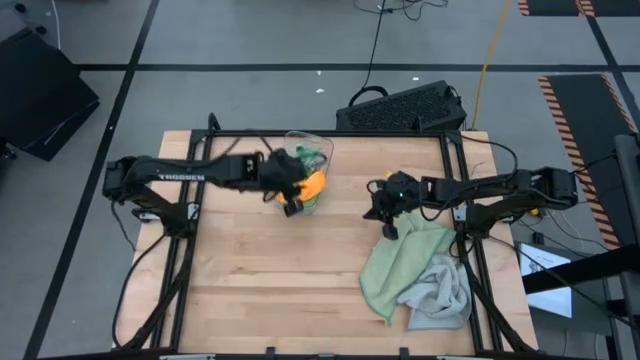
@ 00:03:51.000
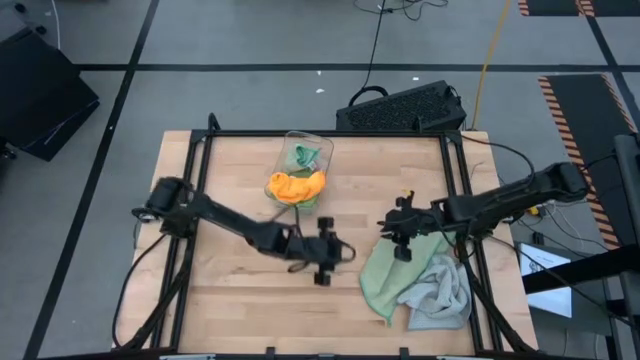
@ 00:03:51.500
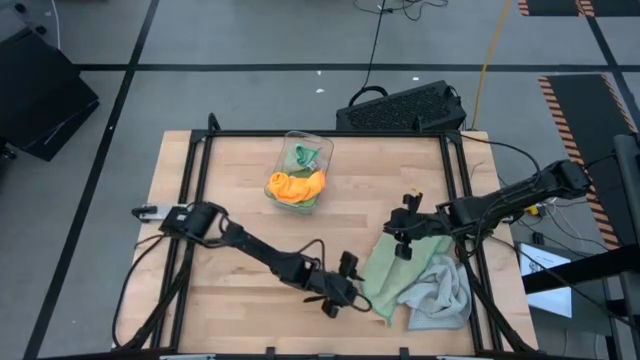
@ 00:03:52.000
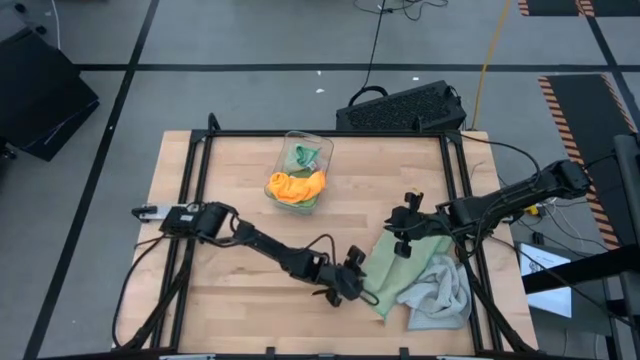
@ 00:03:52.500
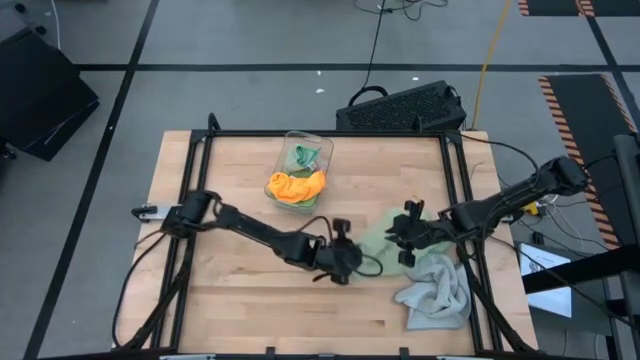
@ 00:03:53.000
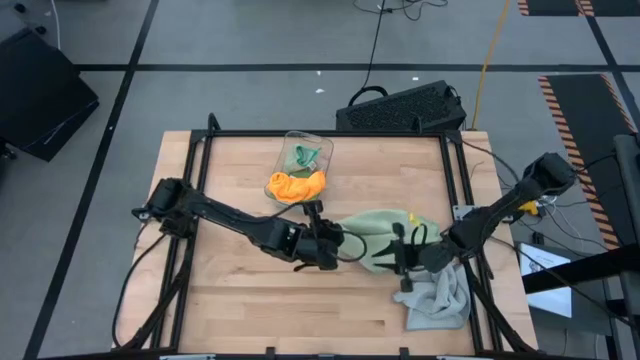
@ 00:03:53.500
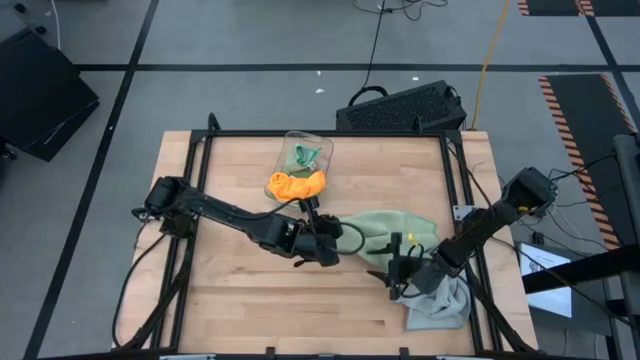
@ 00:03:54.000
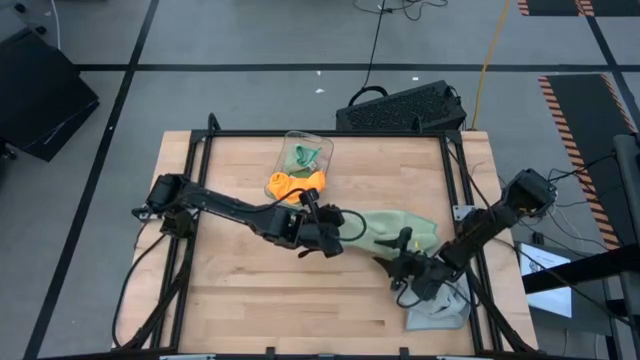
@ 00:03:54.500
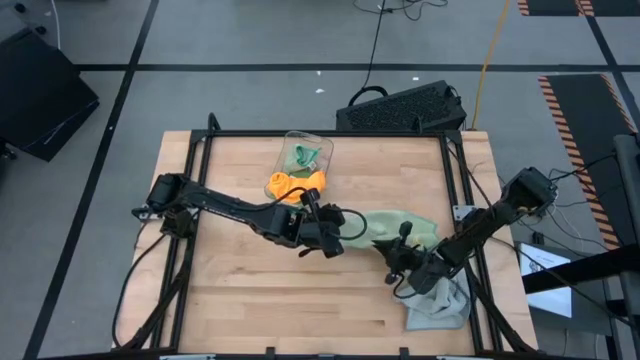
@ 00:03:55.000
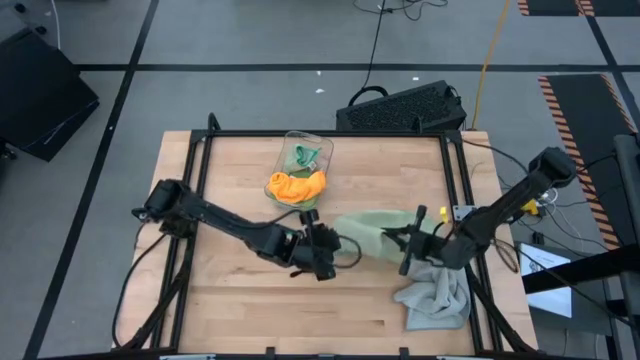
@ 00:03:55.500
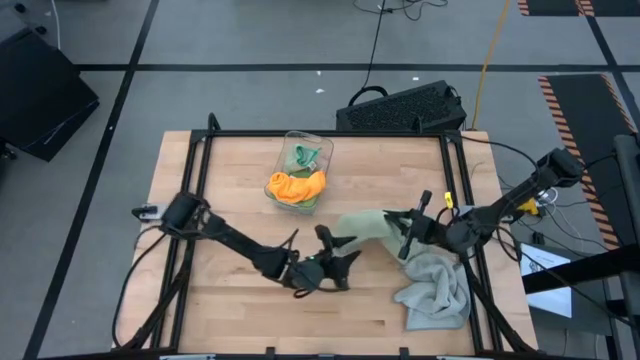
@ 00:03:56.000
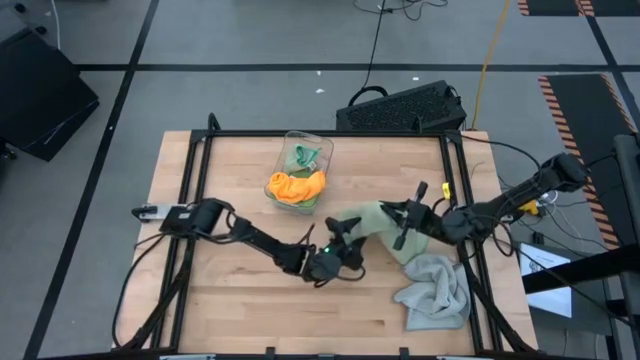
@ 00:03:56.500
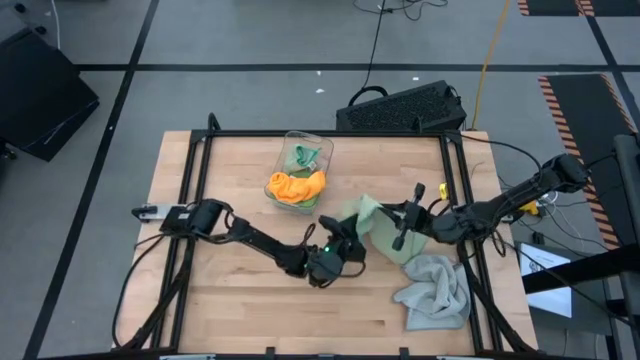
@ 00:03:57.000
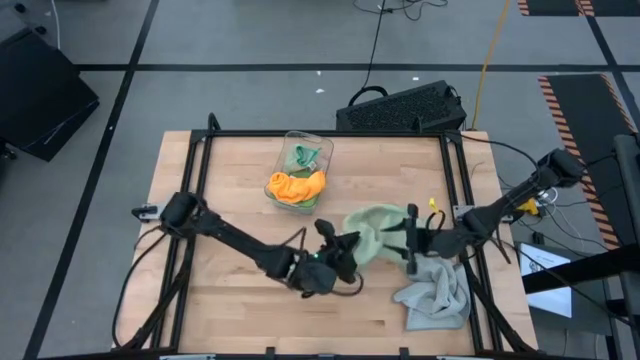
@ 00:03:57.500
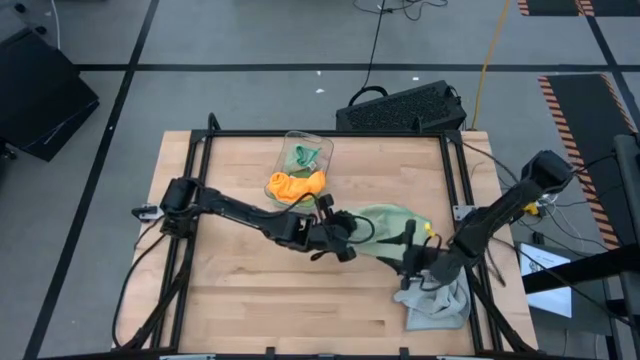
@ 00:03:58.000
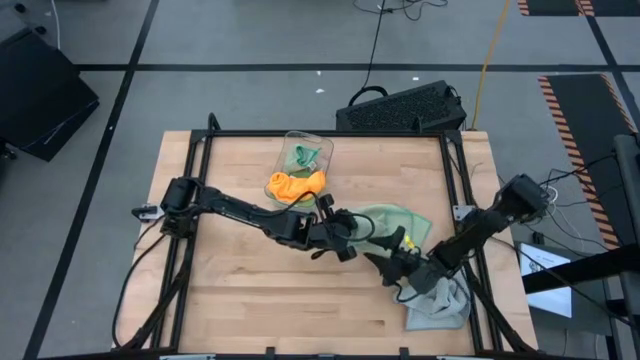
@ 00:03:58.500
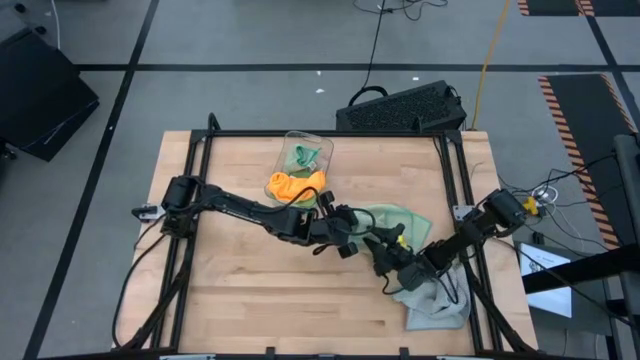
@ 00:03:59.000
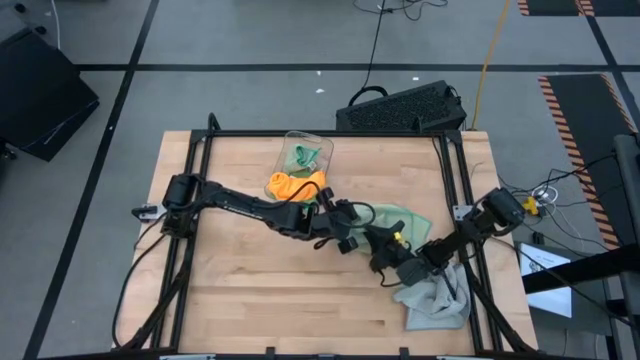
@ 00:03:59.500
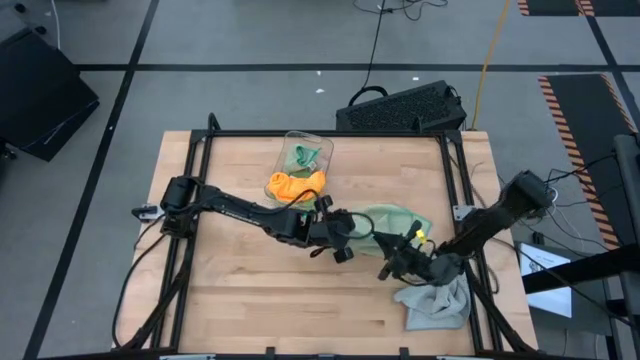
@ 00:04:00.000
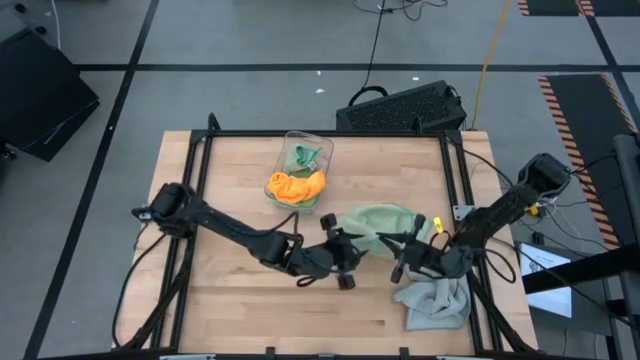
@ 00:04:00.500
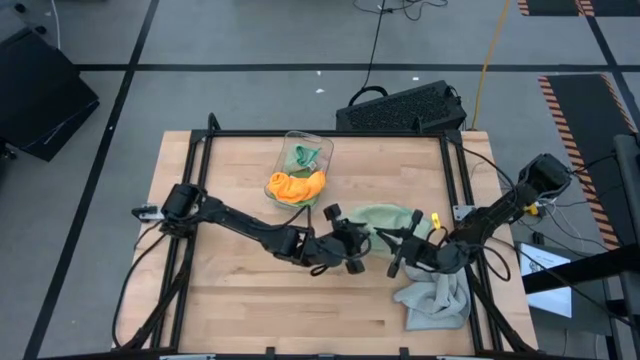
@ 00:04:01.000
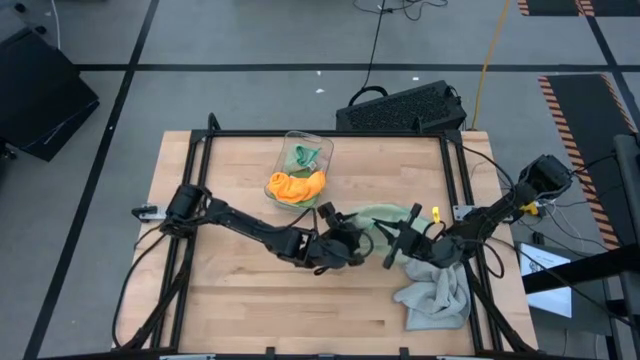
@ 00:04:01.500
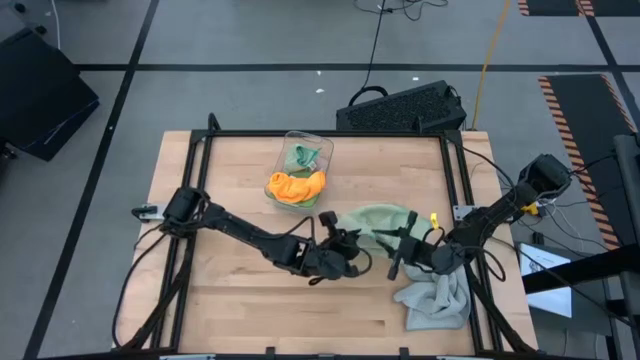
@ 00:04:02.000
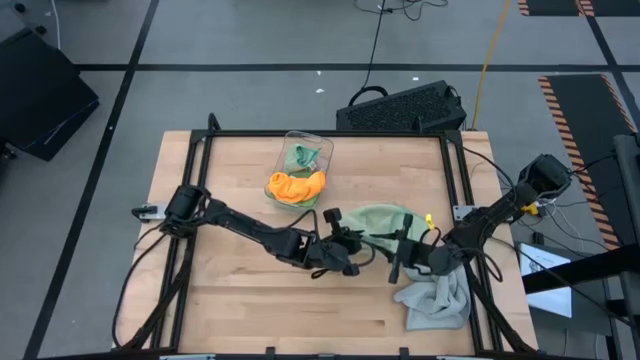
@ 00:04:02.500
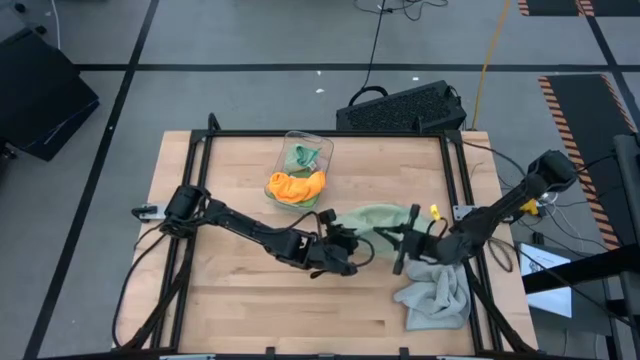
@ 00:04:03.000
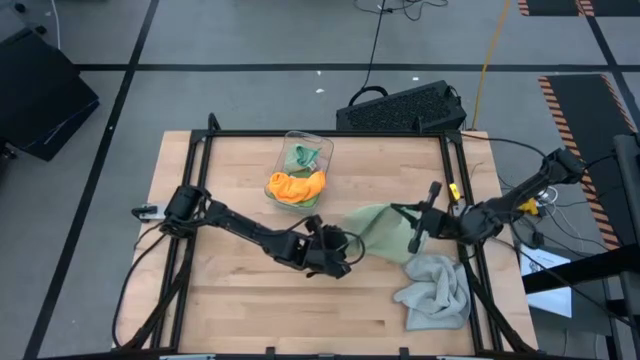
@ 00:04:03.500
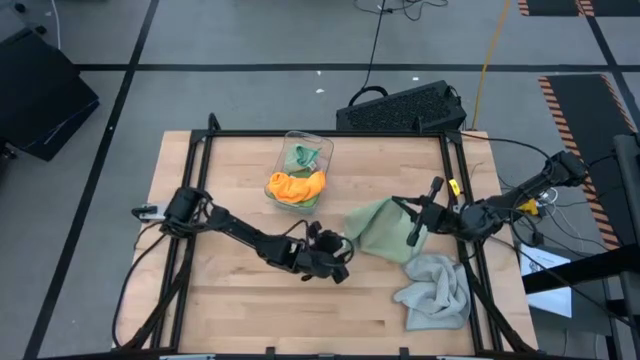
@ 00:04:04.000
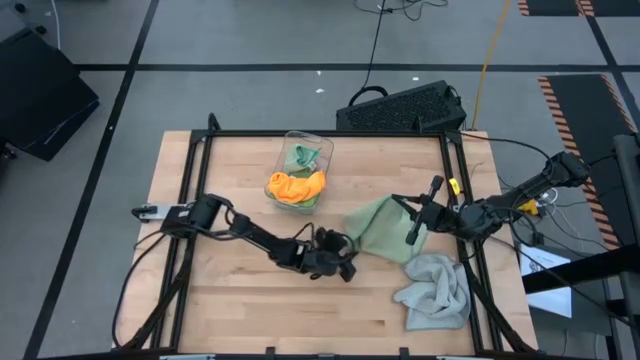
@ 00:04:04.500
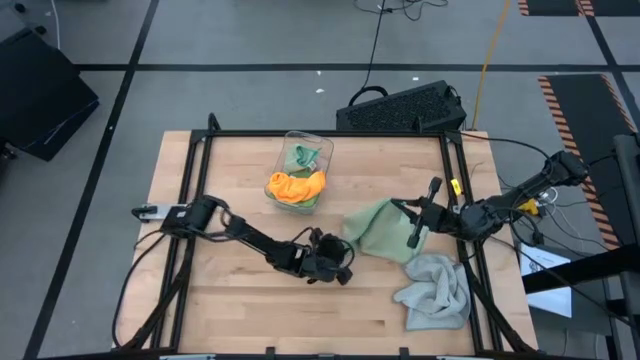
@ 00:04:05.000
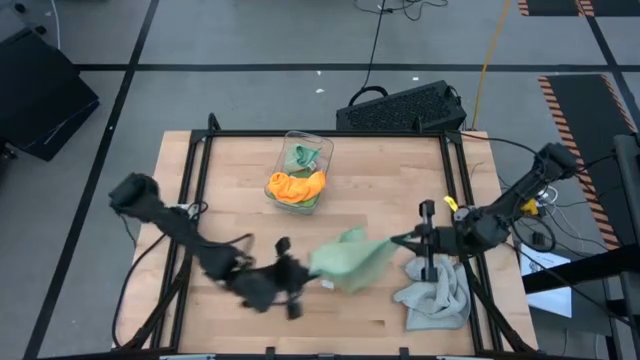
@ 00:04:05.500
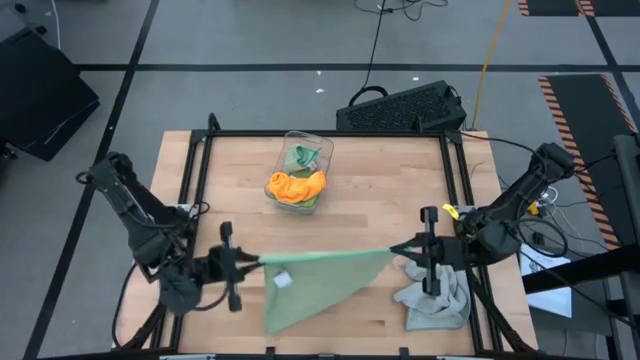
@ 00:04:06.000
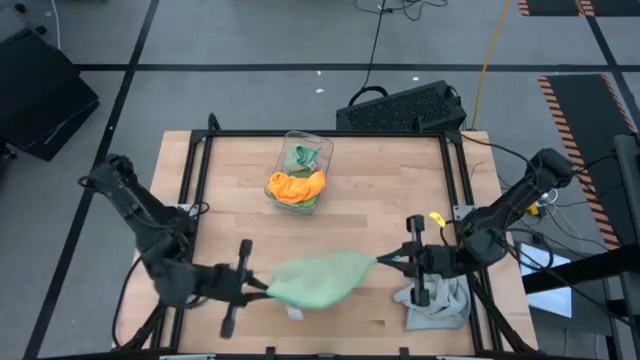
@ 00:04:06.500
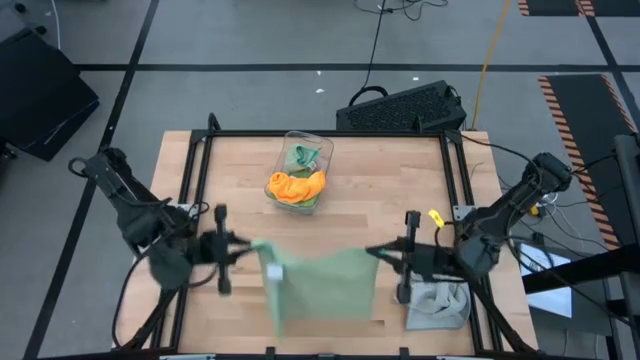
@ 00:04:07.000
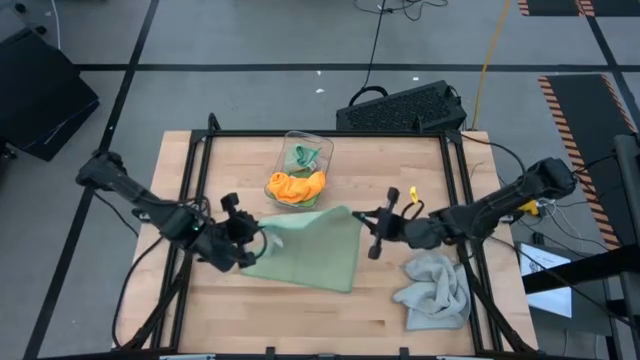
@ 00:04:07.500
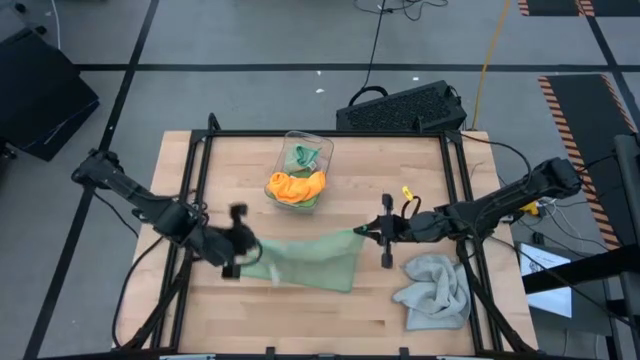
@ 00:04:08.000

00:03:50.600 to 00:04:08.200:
Task: Fold microfiber towels
Fold the light green towel
